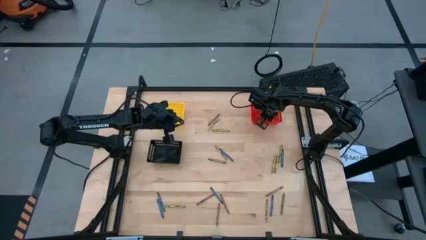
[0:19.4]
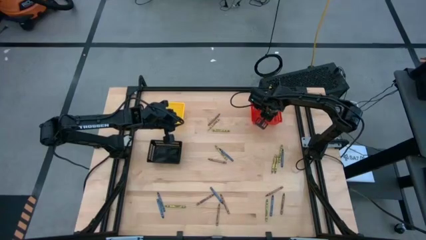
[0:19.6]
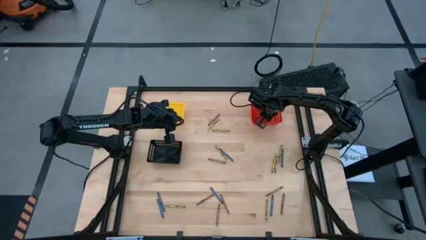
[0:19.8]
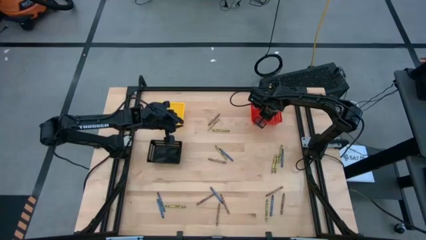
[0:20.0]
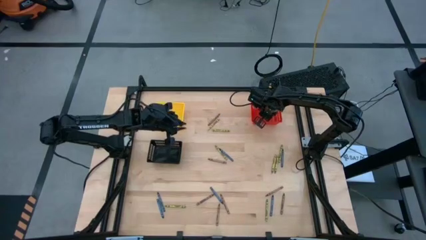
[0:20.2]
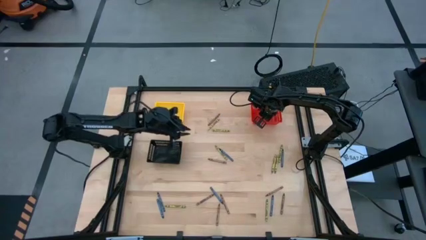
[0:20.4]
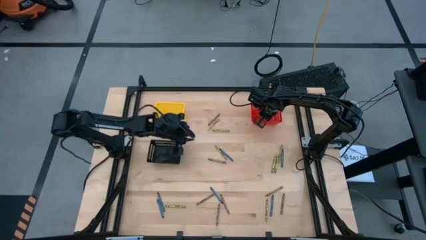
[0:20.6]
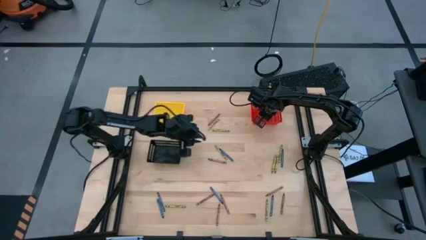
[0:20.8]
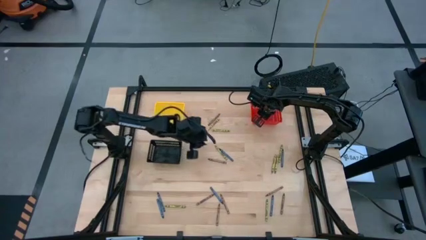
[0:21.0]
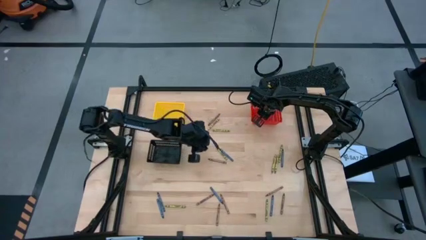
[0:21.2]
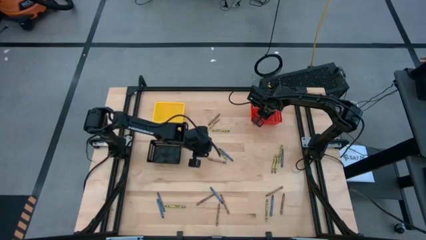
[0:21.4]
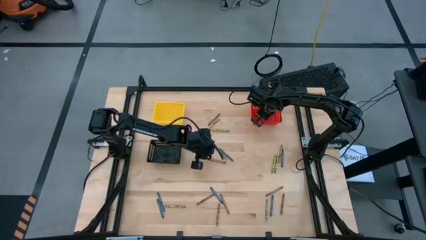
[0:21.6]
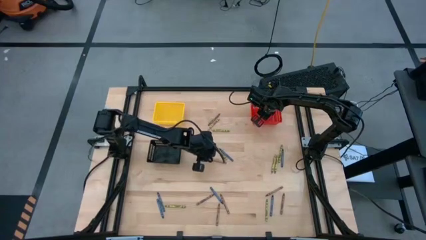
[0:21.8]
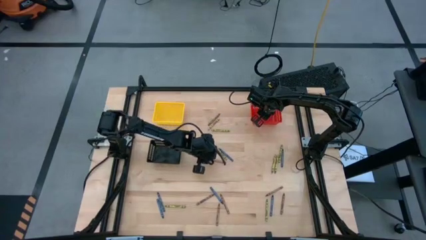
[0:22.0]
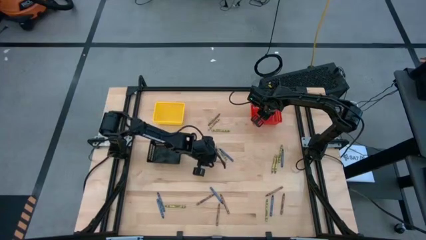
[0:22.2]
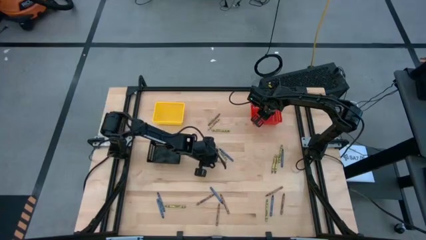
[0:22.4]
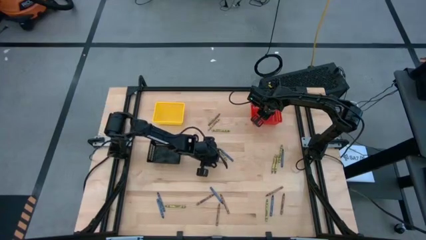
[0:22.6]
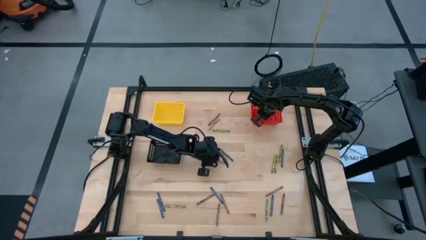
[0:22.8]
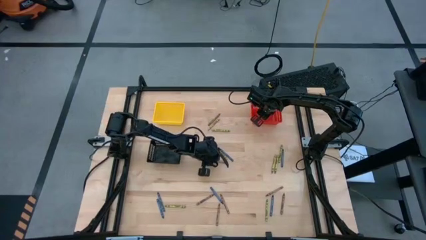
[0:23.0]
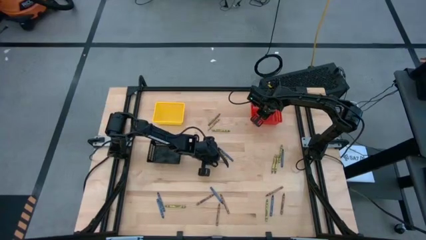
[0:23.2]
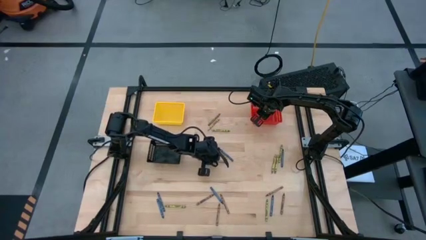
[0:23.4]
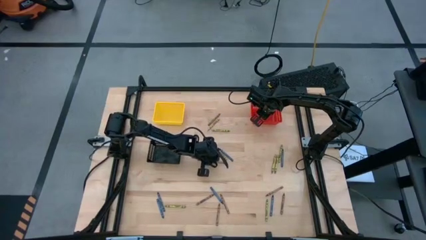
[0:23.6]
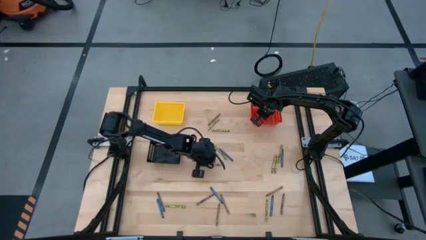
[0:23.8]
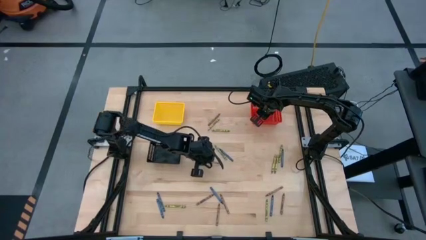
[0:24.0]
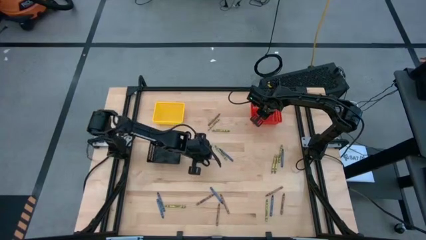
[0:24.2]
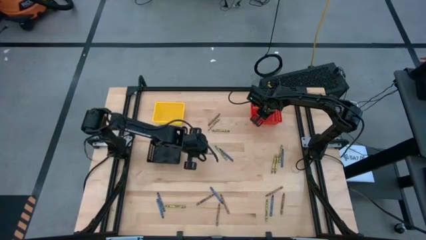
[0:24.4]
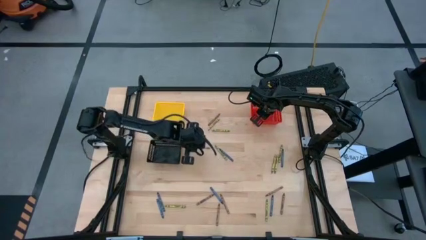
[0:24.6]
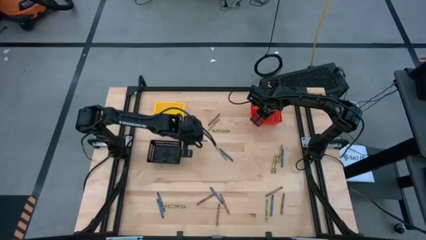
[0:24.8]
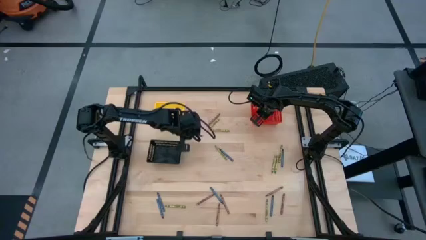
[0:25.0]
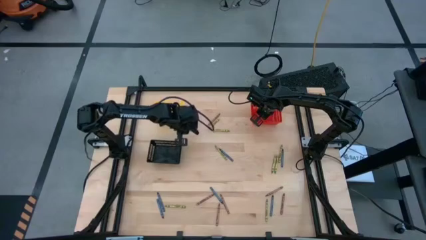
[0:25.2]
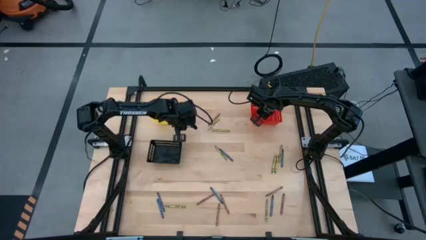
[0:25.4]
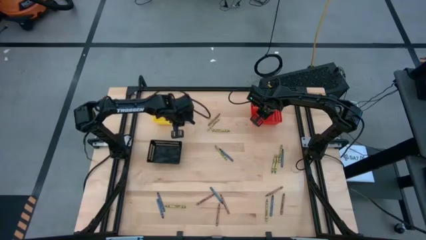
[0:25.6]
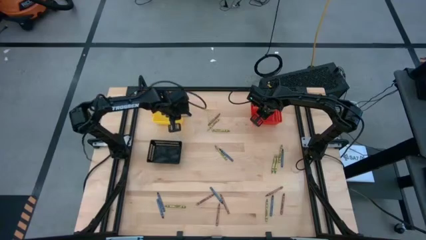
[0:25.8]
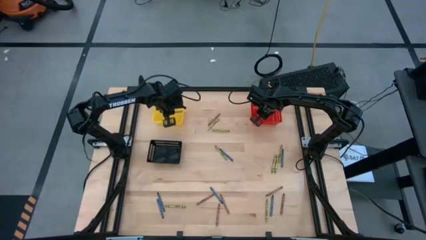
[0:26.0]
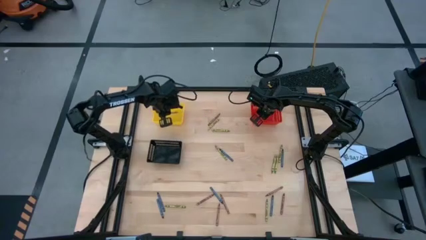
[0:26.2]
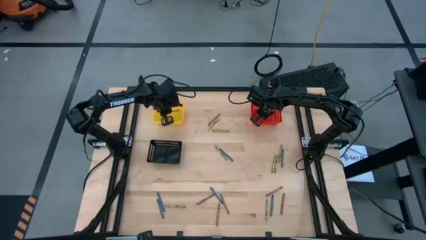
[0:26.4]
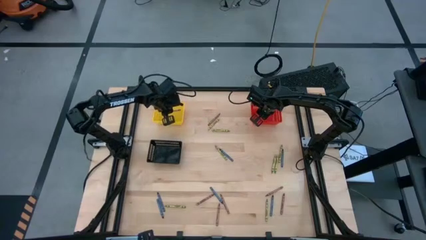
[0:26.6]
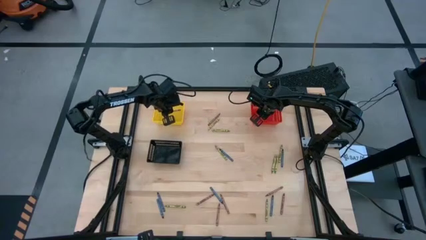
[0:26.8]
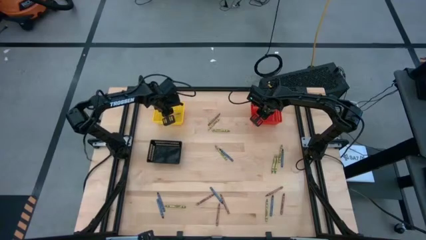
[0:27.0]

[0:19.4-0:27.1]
Task: Sort crayons
Put the brown crayon into the yellow bin

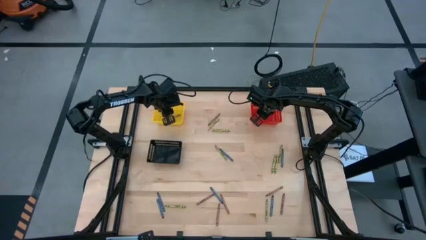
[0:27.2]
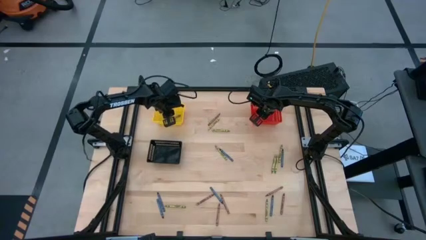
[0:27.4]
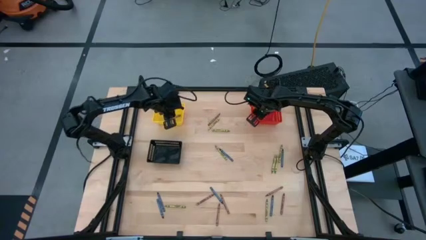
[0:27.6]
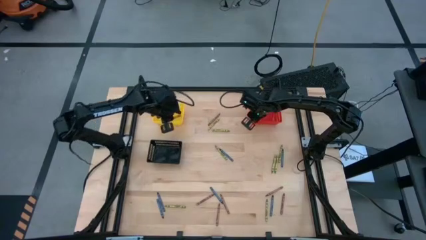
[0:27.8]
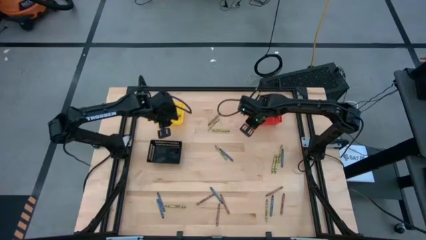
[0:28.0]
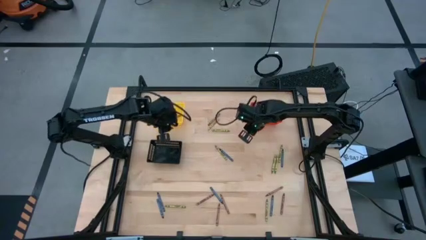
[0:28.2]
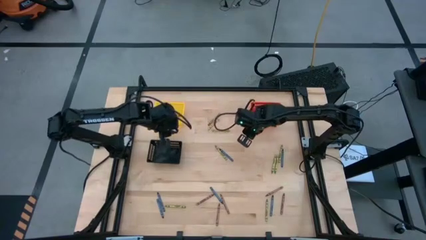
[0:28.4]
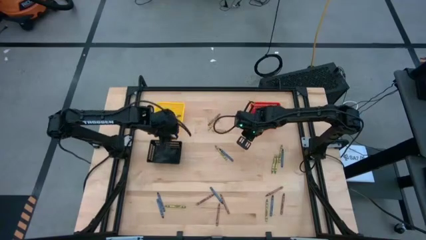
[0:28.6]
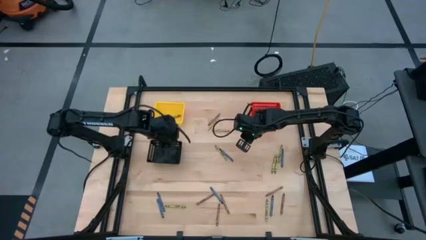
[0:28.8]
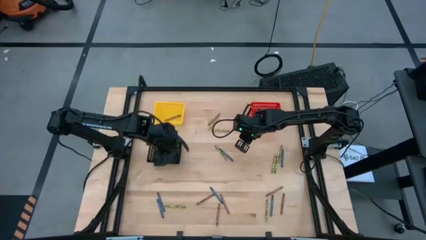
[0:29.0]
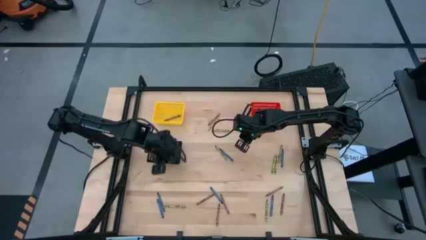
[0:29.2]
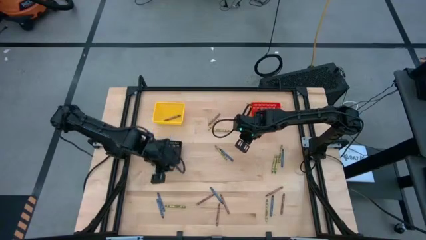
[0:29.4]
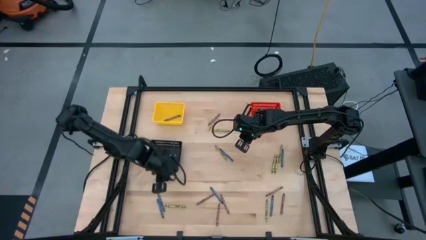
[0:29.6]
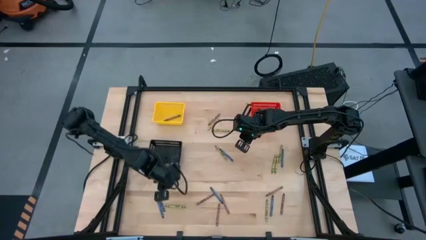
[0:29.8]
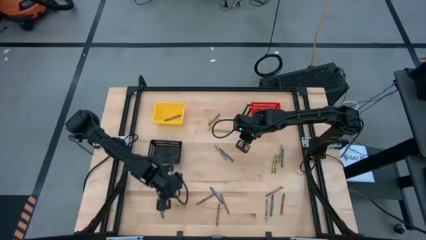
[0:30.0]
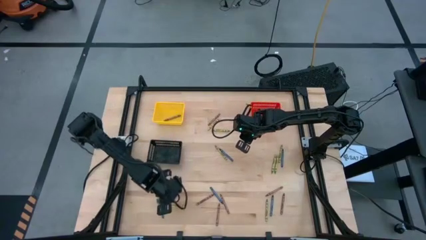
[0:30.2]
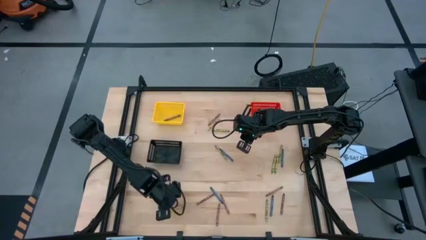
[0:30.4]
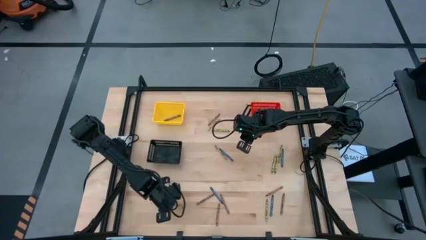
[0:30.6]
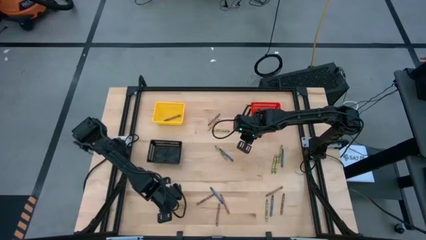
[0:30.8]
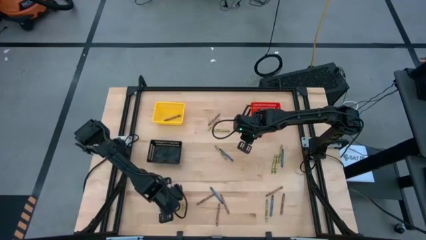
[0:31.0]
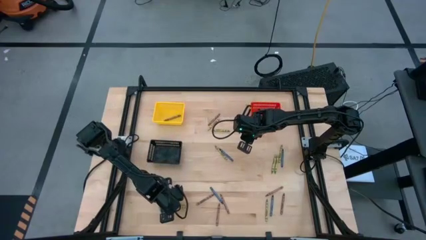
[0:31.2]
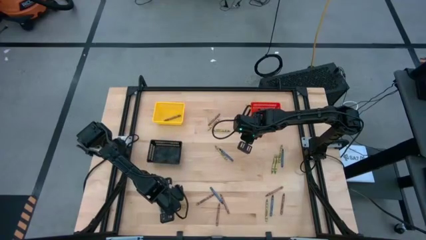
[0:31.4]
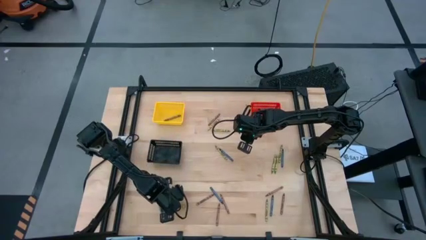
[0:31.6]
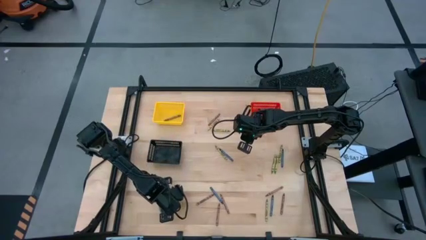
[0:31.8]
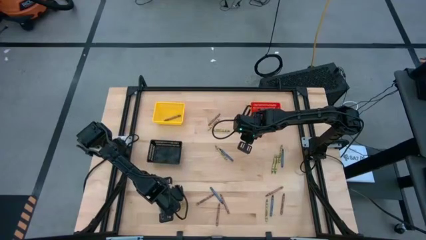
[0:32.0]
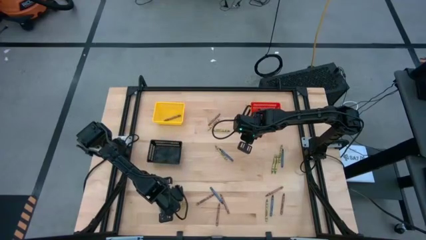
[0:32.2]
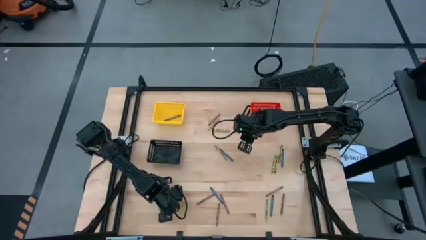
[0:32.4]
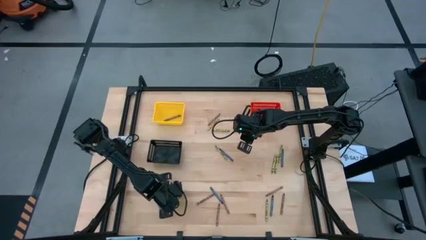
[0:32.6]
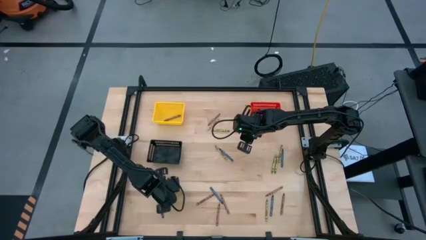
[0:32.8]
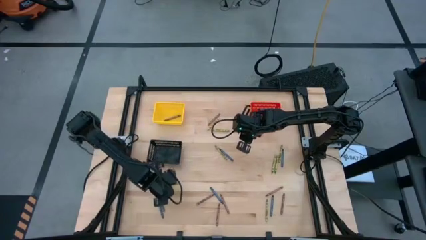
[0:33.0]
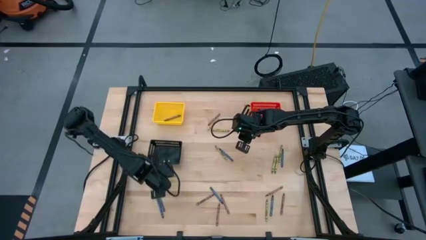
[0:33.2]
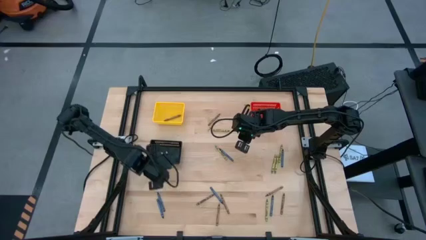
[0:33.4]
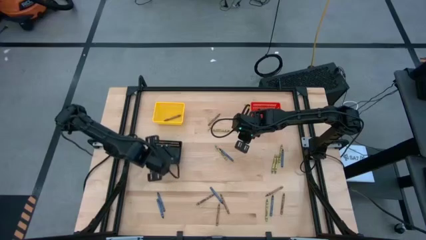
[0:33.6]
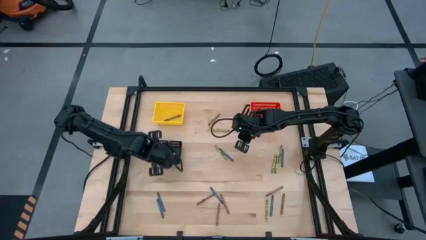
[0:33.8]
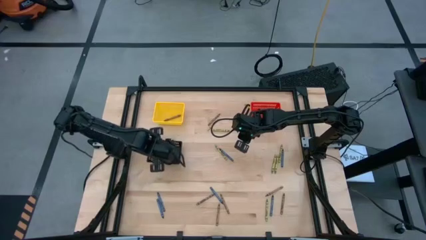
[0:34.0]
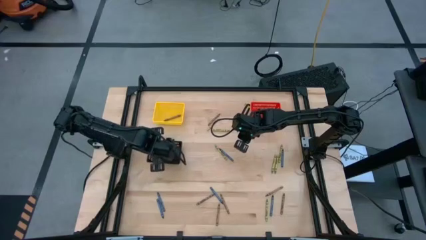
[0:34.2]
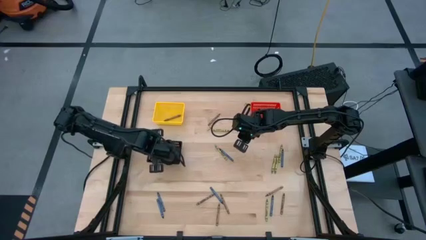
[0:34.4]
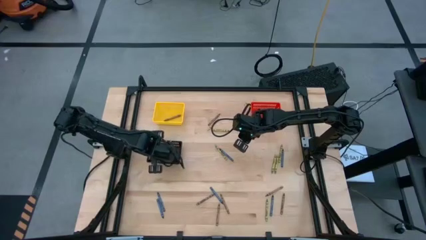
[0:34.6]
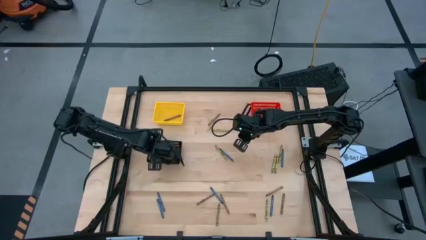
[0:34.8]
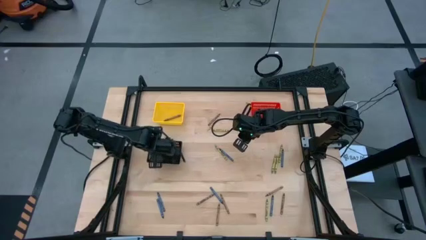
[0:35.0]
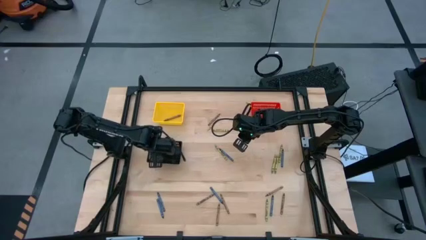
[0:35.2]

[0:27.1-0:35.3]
Put the green crayon into the black bin
